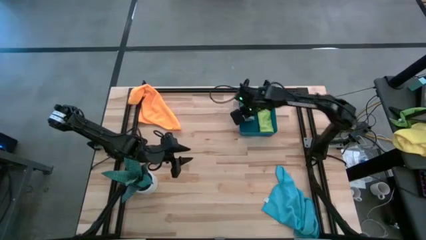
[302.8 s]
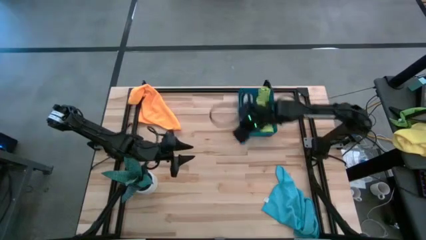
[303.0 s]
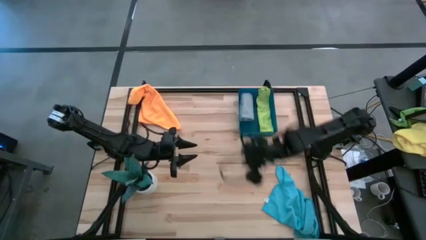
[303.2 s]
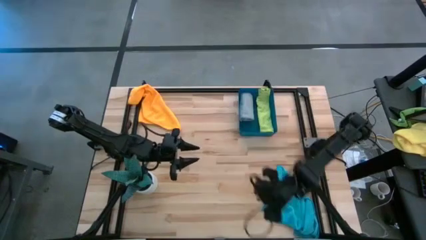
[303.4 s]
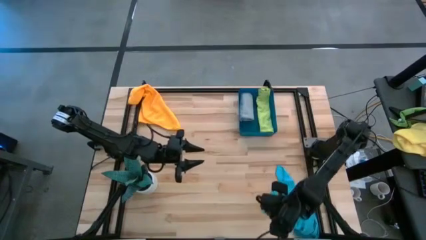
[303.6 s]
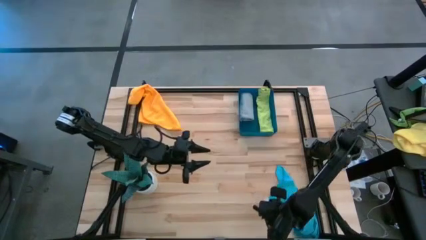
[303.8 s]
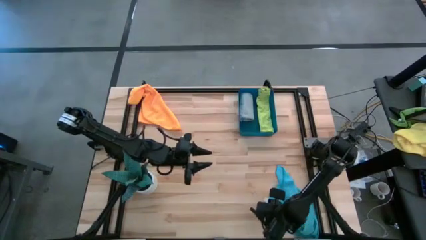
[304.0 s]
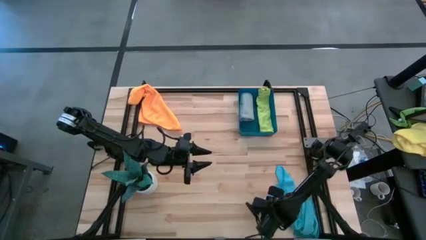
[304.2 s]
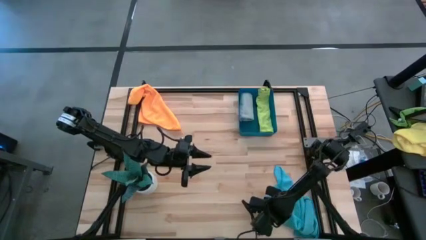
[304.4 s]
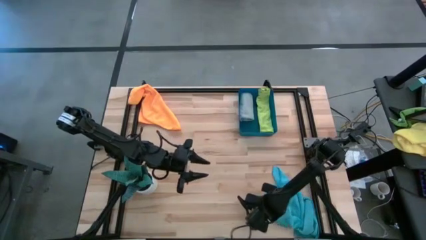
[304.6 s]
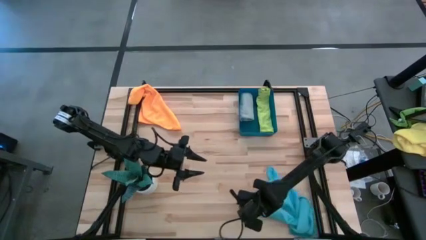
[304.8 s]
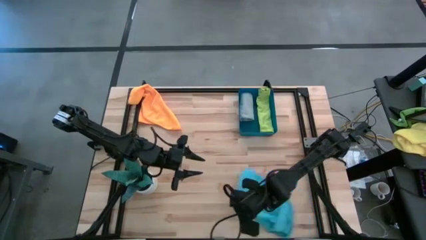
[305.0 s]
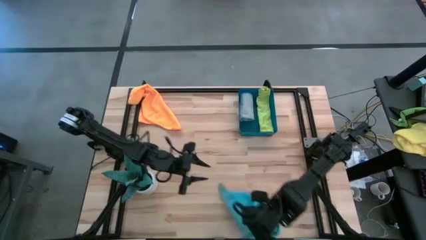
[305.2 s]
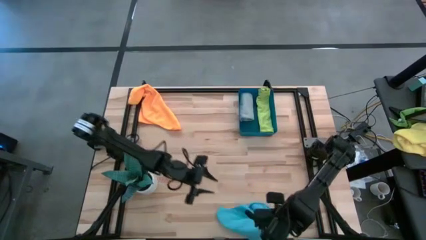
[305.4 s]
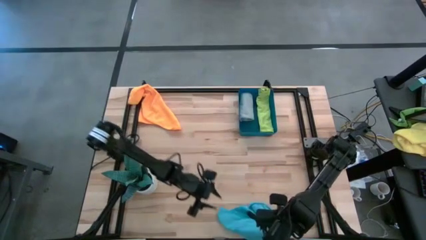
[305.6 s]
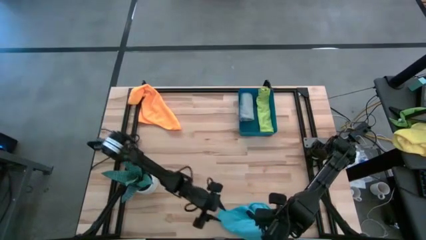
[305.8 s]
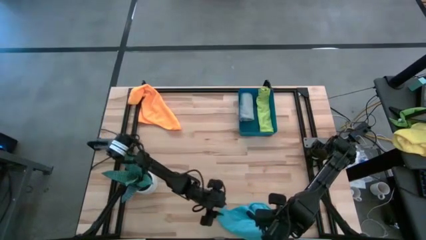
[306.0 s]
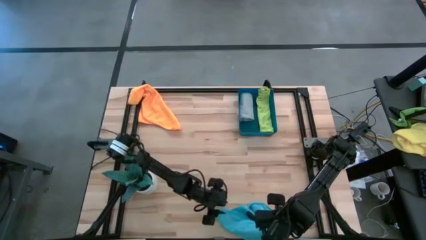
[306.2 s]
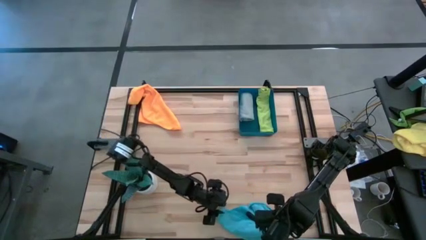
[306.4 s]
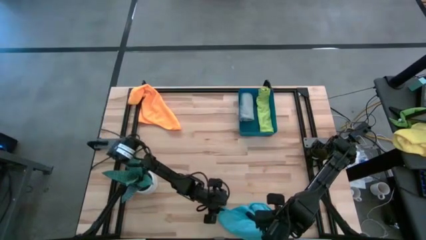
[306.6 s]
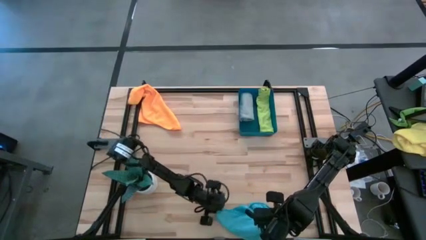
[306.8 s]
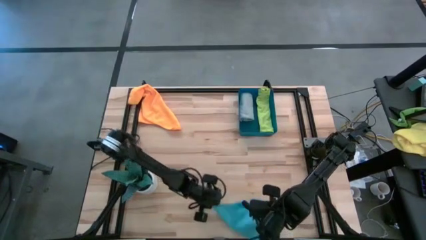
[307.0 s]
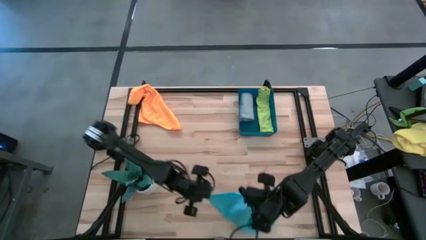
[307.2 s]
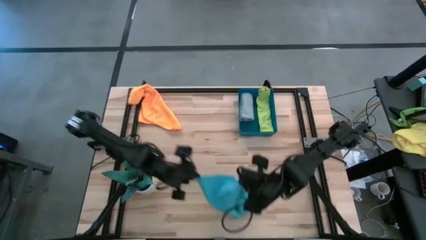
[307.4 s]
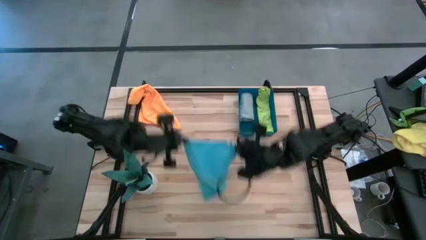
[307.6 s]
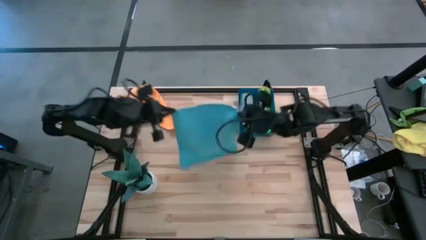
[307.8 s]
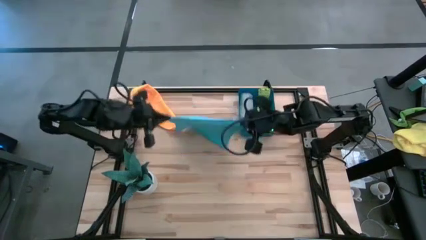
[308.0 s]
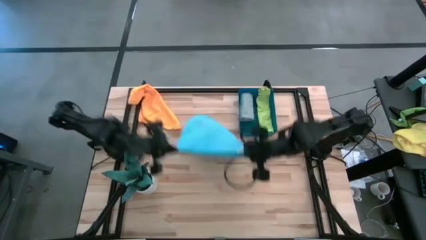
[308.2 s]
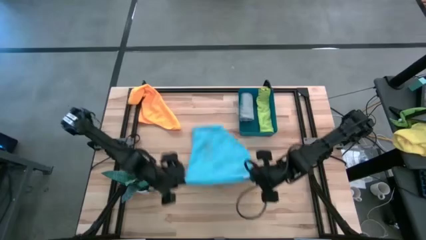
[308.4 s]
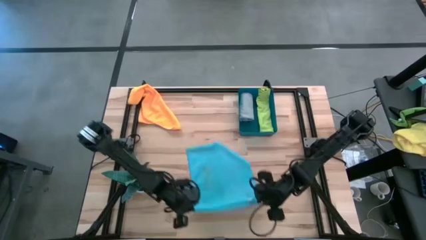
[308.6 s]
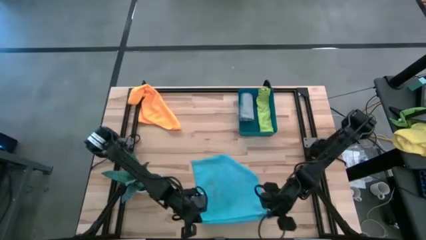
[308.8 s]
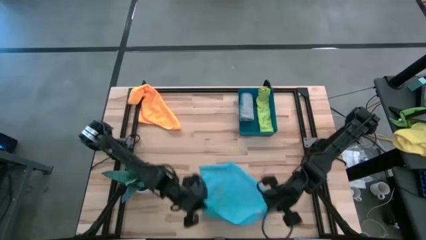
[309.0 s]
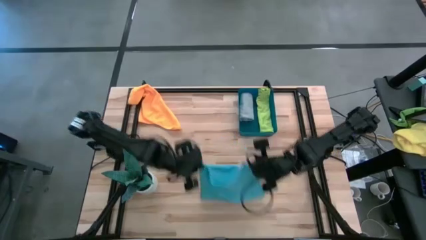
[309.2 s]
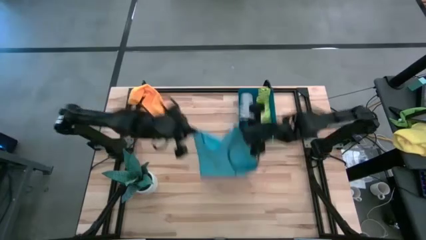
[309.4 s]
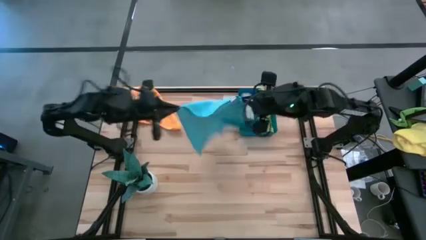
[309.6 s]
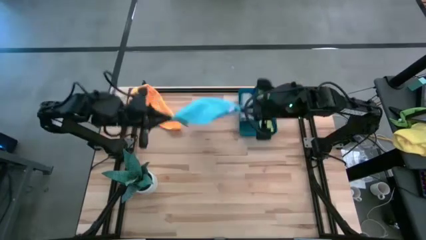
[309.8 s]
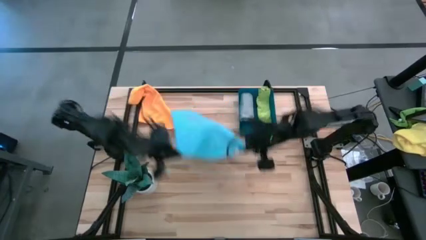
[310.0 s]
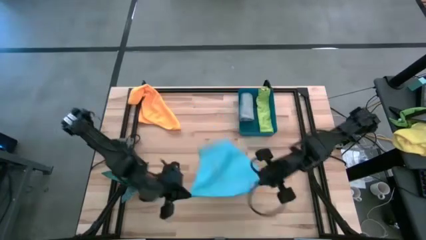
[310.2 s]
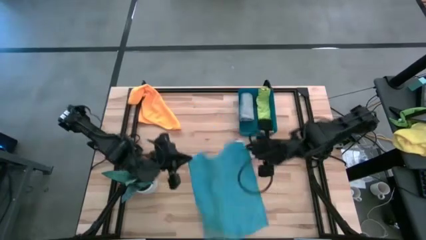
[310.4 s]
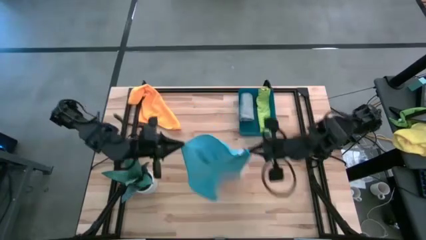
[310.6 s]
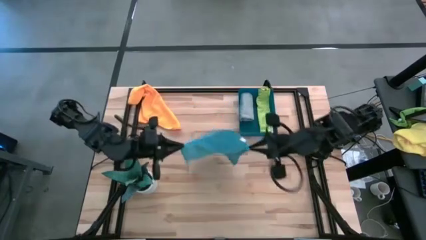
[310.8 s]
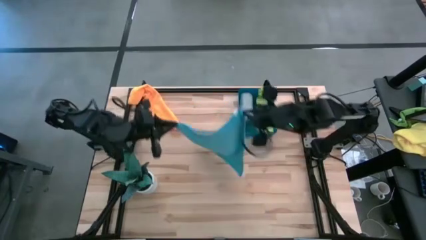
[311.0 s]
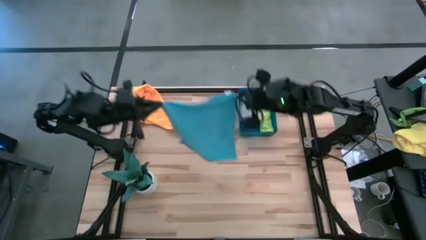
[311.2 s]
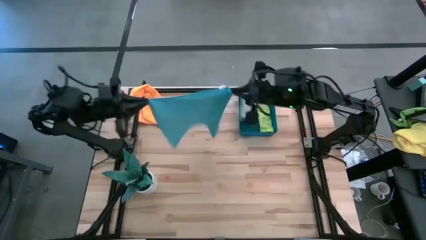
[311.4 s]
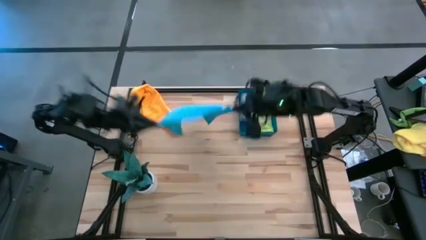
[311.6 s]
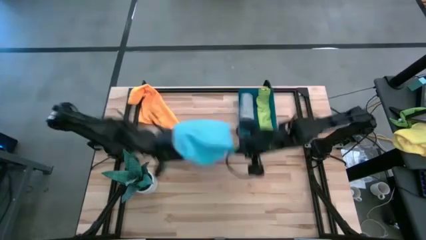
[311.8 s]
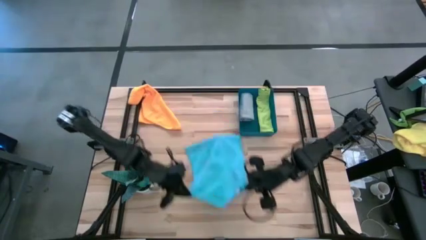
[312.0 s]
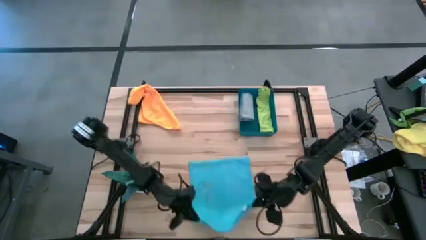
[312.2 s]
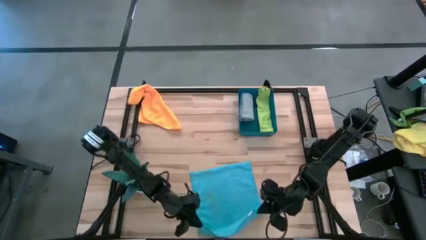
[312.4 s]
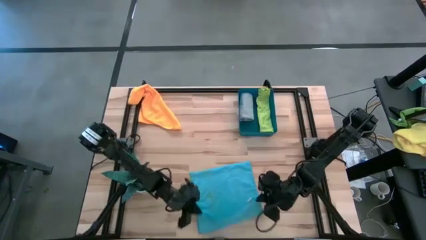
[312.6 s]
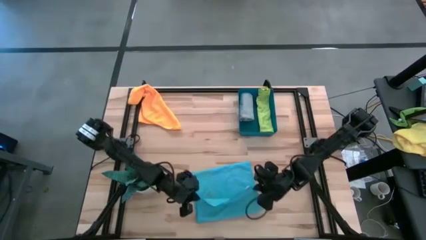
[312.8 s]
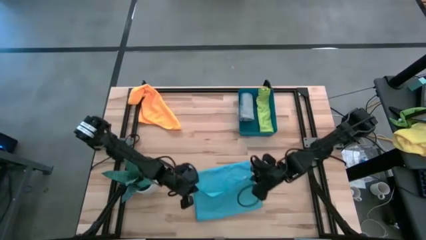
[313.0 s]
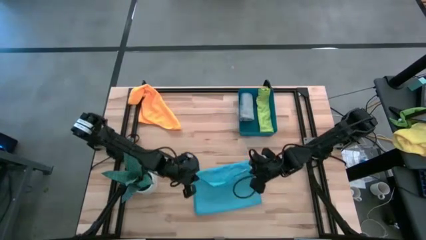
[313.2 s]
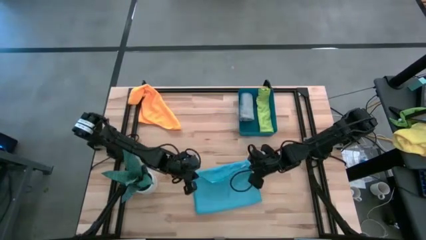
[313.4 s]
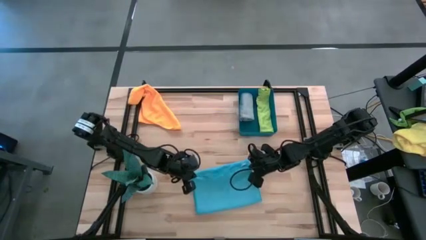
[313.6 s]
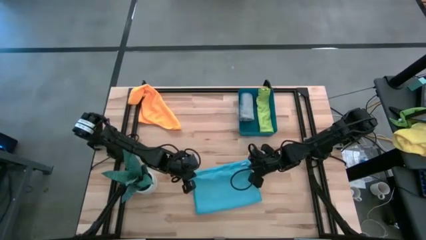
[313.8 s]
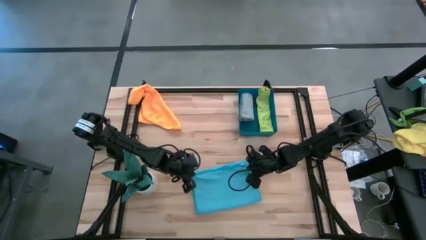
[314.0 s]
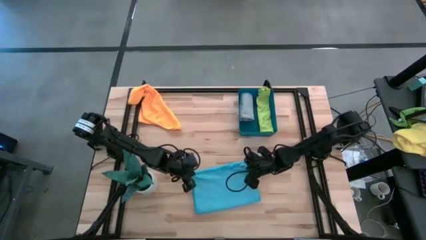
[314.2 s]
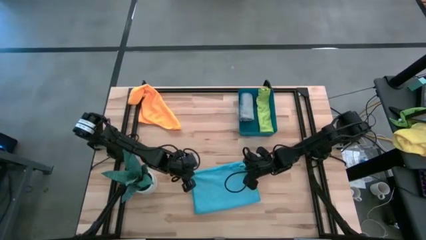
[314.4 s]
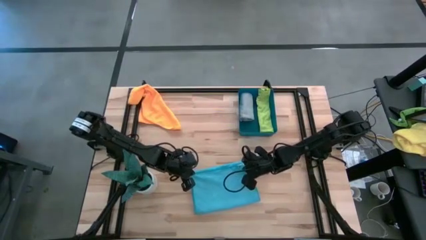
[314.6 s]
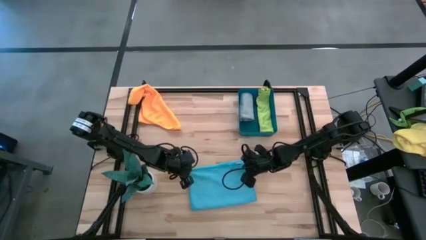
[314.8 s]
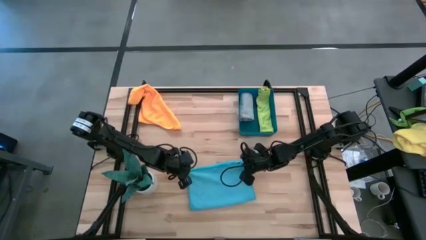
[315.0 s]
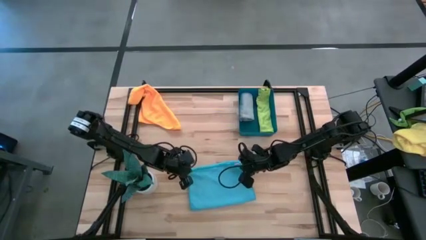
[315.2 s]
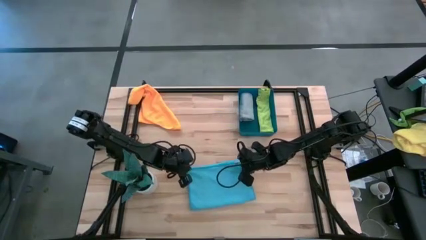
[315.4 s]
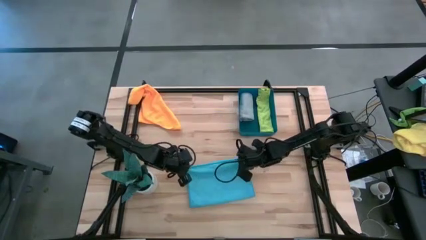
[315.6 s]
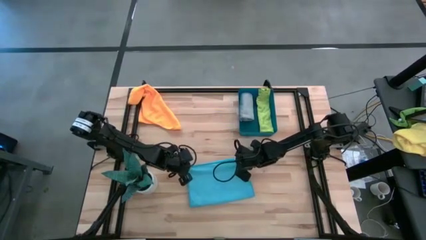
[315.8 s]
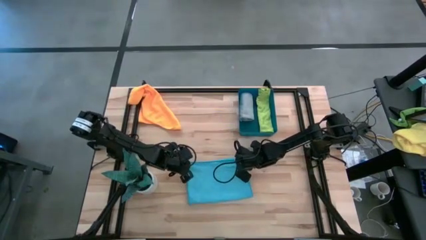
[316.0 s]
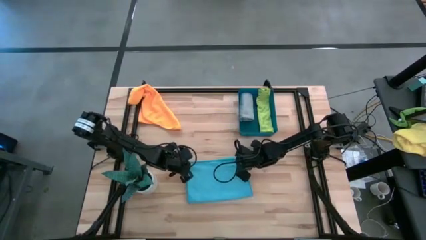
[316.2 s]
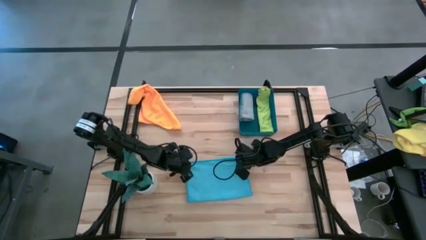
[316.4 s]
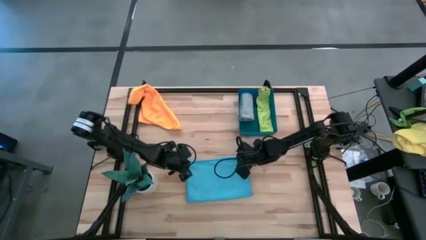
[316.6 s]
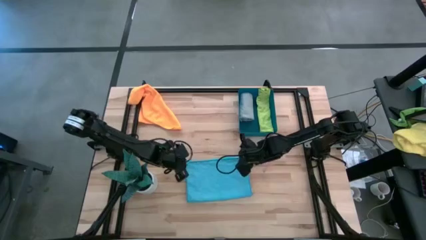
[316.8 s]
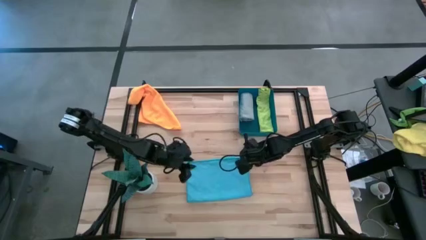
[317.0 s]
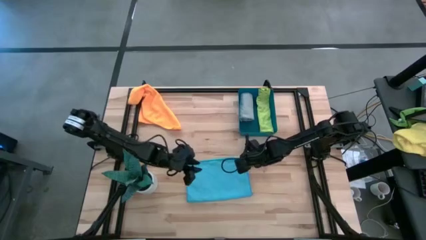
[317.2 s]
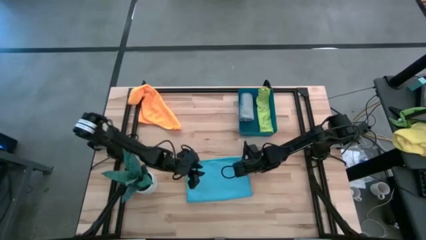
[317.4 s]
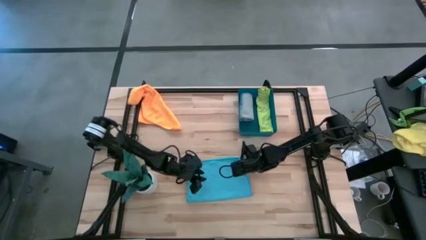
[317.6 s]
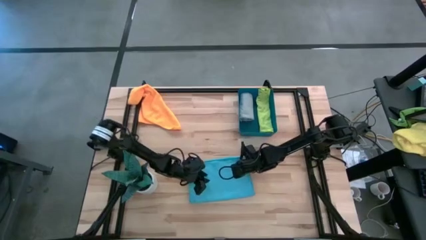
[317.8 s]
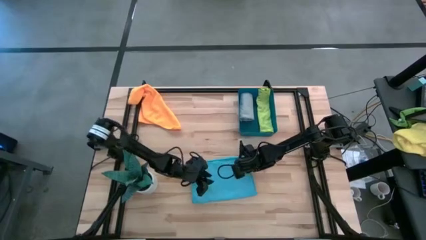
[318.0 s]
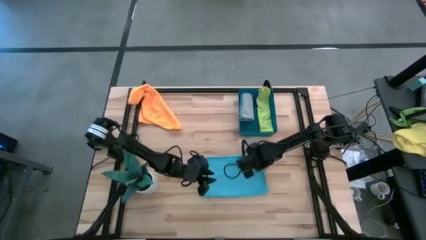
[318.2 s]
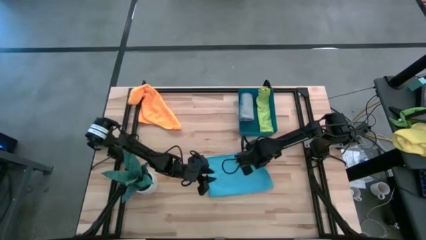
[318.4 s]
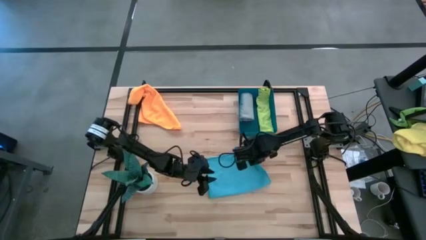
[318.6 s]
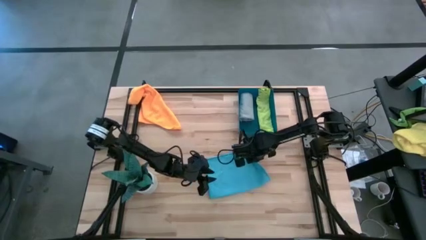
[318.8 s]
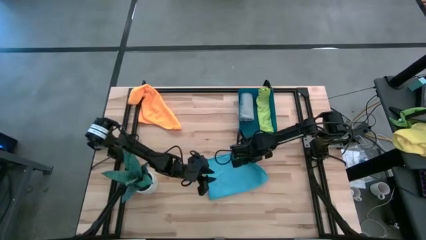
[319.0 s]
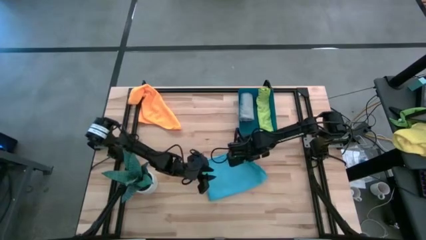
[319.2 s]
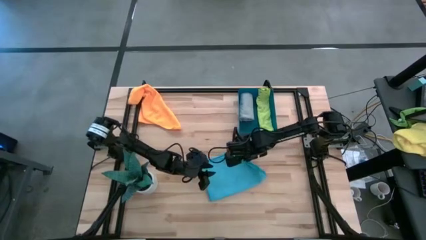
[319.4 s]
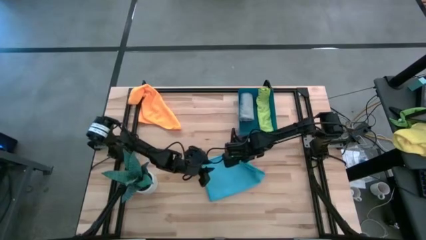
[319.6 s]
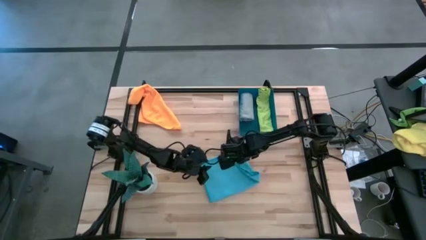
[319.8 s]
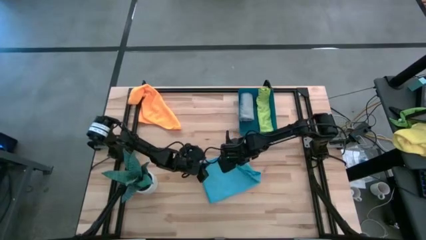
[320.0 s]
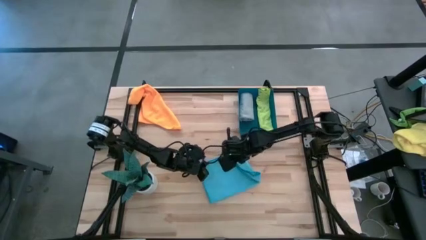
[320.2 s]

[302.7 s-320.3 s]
Task: Roll microfiber towels into tight, uniform cylinder then place into a basket
Roll the blue towel
